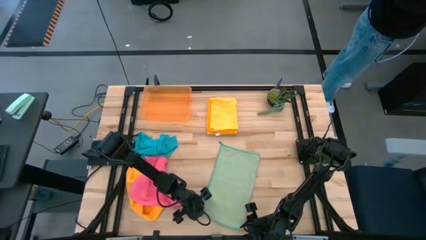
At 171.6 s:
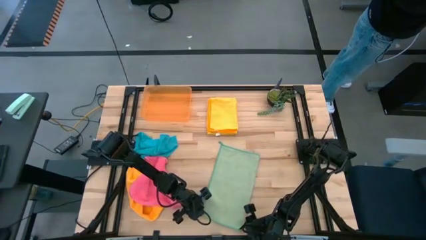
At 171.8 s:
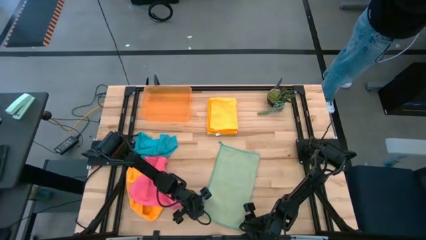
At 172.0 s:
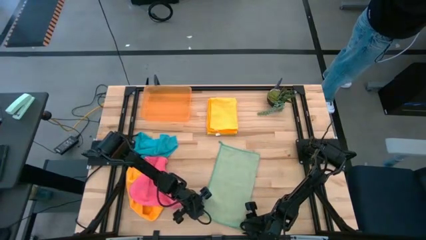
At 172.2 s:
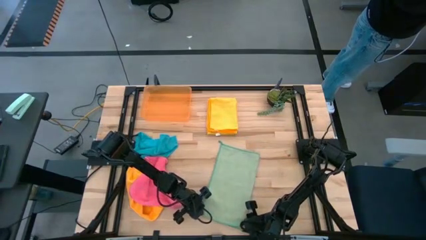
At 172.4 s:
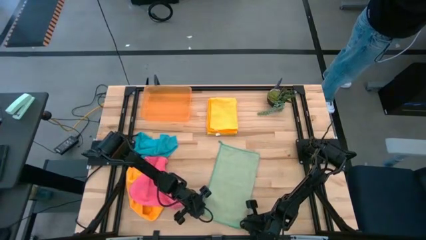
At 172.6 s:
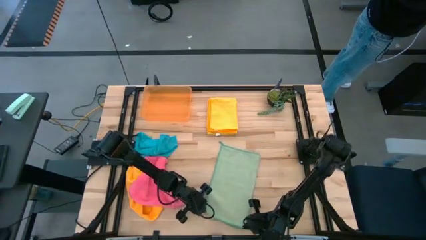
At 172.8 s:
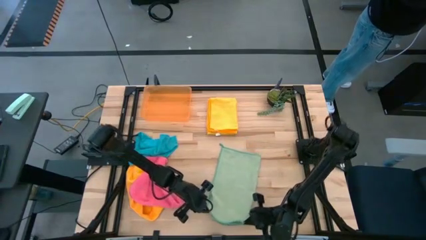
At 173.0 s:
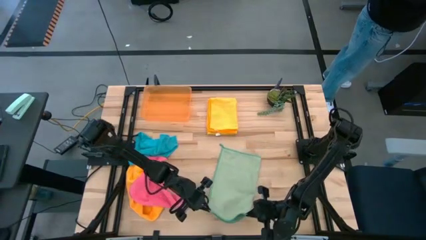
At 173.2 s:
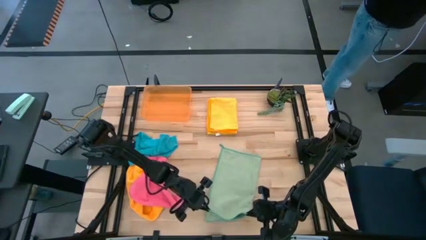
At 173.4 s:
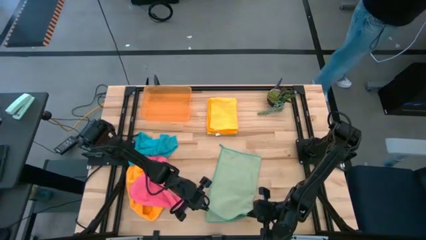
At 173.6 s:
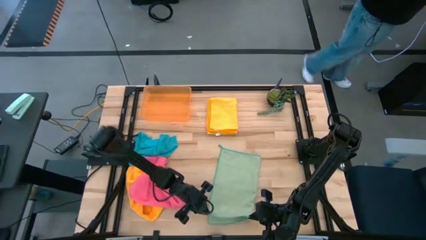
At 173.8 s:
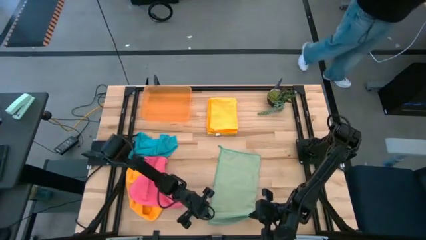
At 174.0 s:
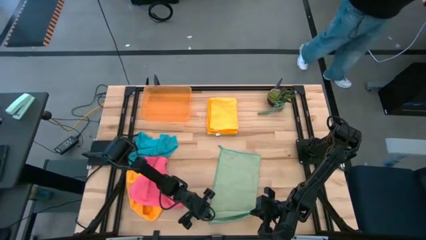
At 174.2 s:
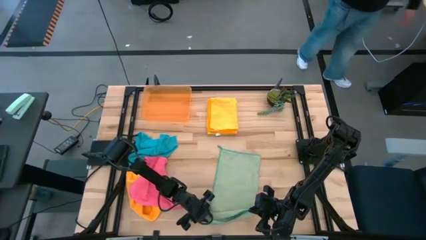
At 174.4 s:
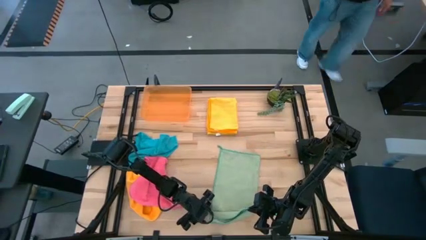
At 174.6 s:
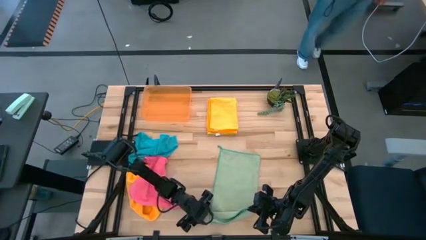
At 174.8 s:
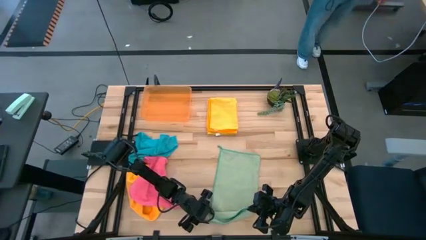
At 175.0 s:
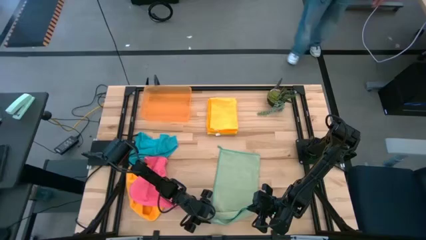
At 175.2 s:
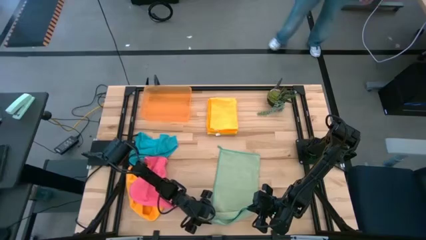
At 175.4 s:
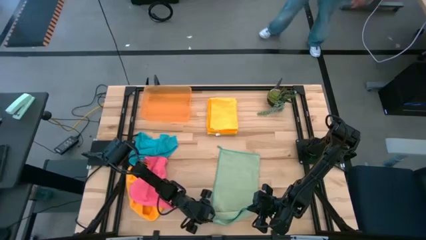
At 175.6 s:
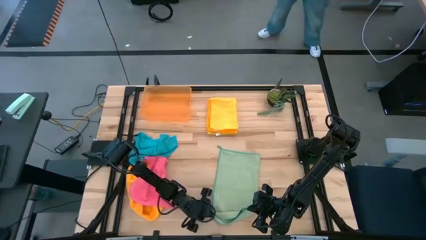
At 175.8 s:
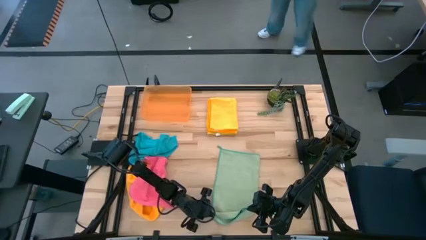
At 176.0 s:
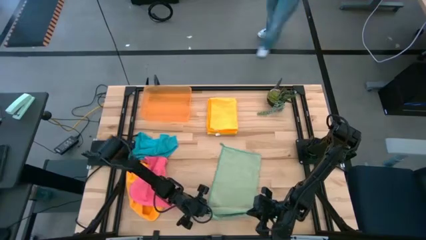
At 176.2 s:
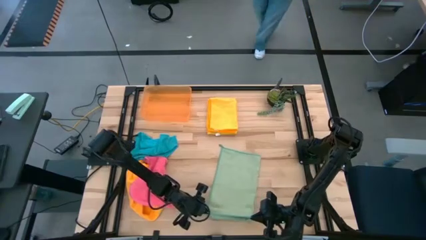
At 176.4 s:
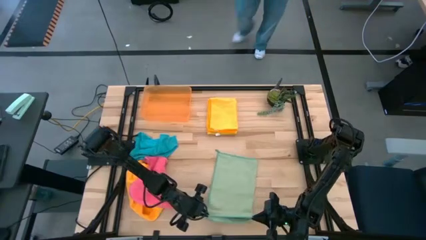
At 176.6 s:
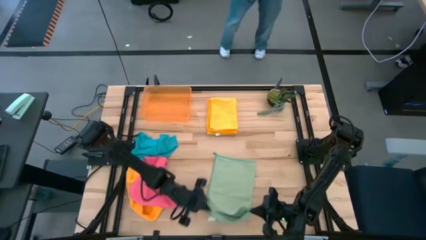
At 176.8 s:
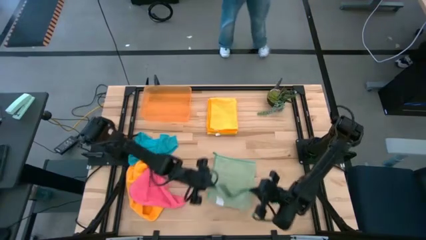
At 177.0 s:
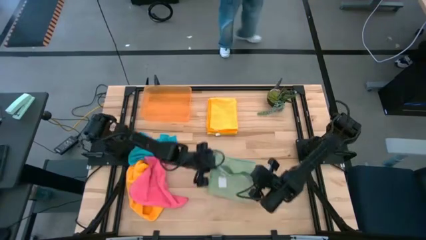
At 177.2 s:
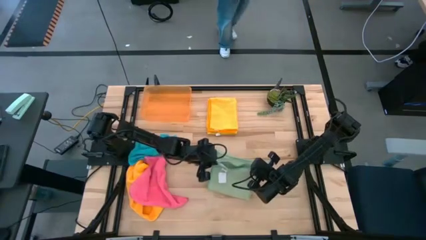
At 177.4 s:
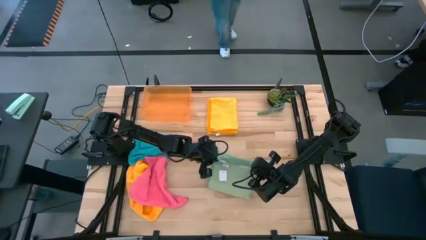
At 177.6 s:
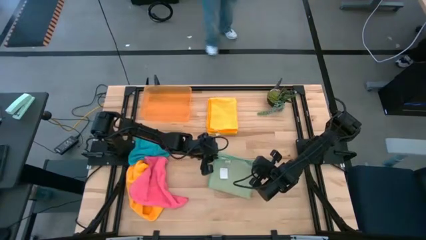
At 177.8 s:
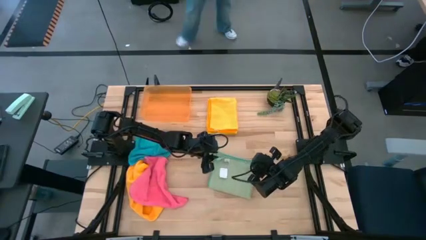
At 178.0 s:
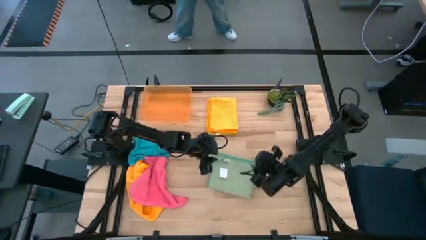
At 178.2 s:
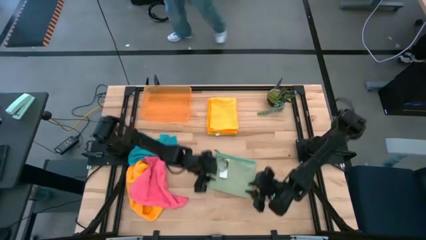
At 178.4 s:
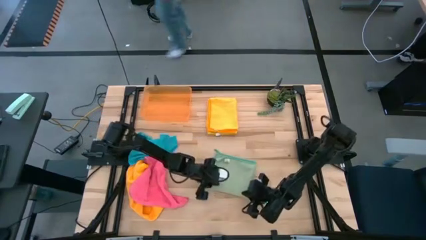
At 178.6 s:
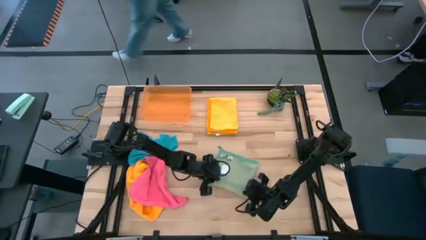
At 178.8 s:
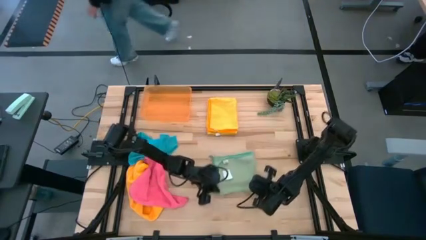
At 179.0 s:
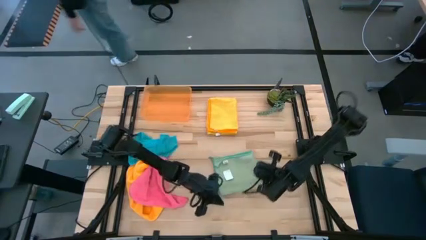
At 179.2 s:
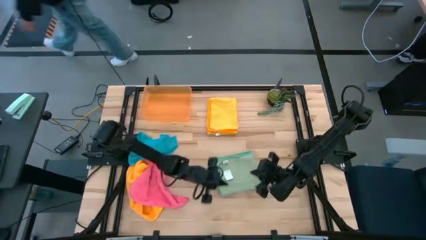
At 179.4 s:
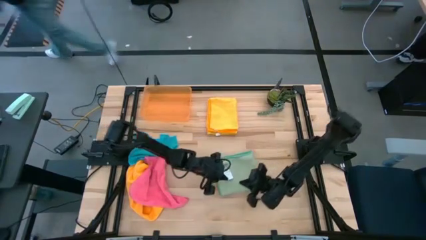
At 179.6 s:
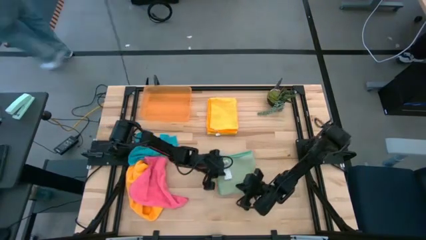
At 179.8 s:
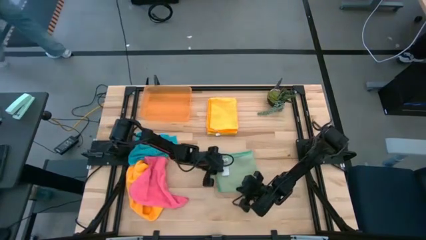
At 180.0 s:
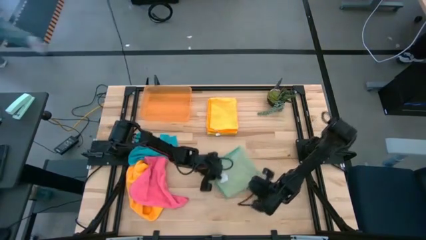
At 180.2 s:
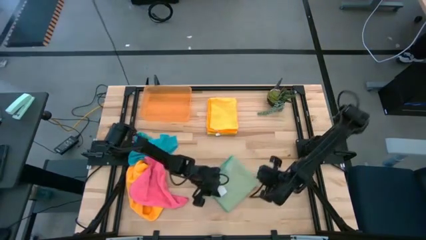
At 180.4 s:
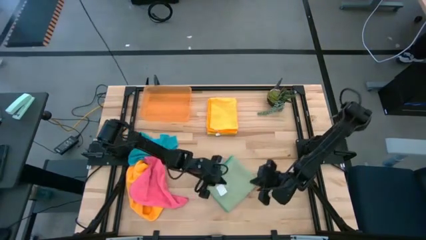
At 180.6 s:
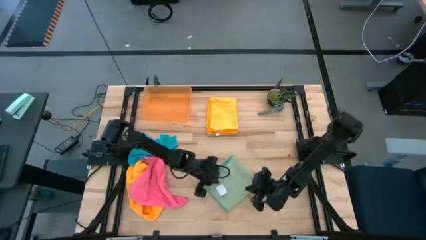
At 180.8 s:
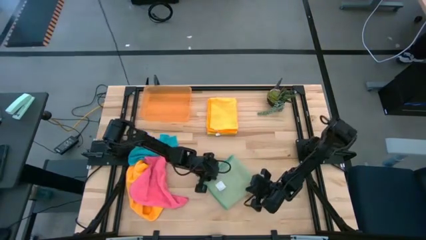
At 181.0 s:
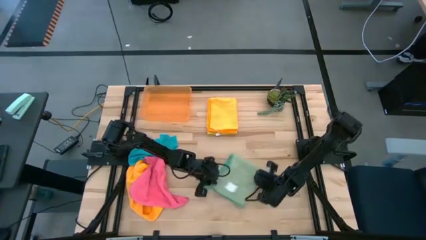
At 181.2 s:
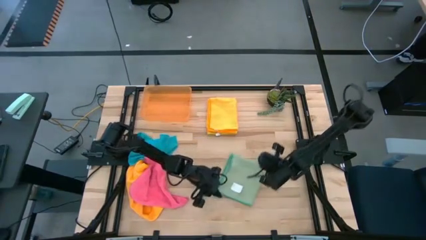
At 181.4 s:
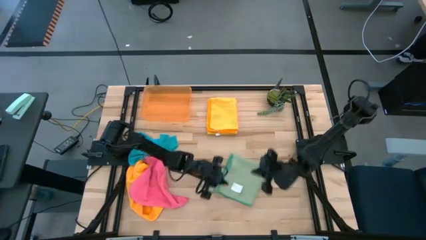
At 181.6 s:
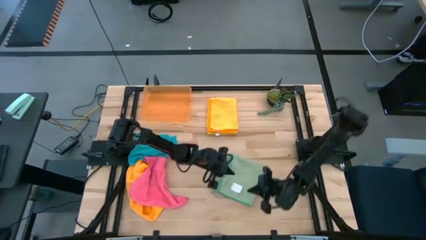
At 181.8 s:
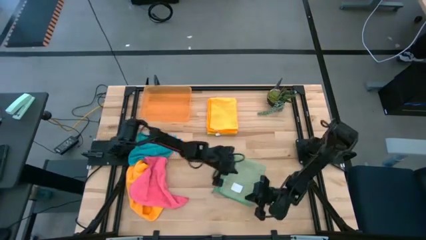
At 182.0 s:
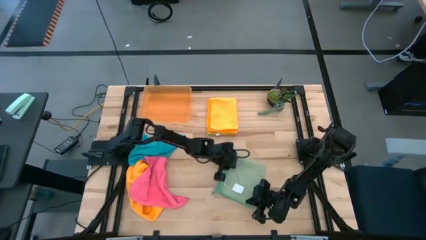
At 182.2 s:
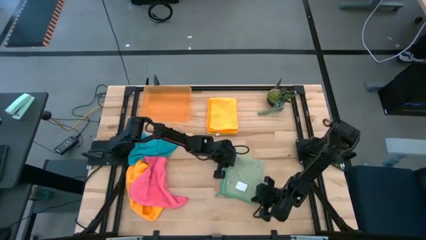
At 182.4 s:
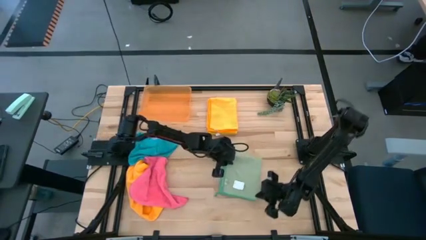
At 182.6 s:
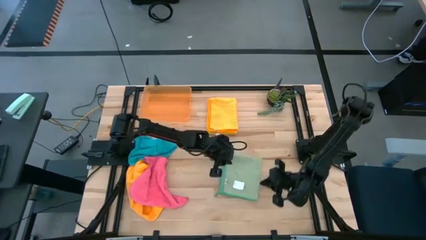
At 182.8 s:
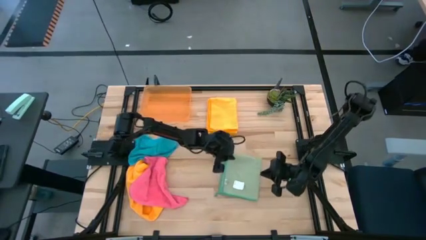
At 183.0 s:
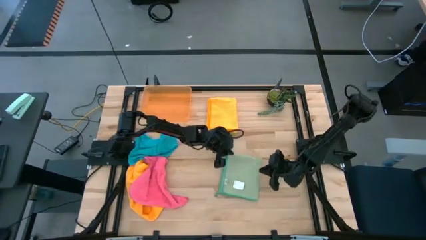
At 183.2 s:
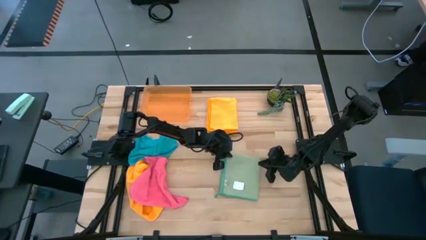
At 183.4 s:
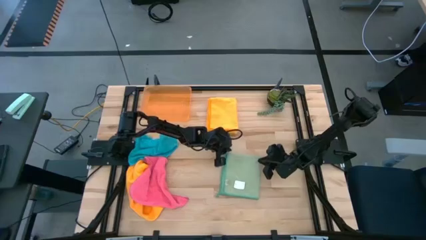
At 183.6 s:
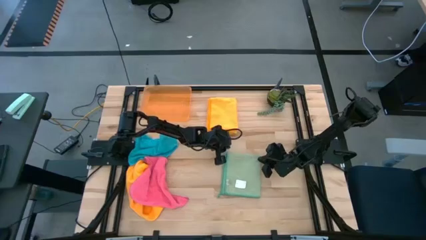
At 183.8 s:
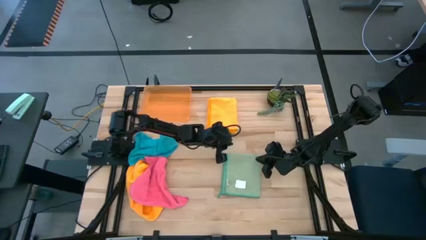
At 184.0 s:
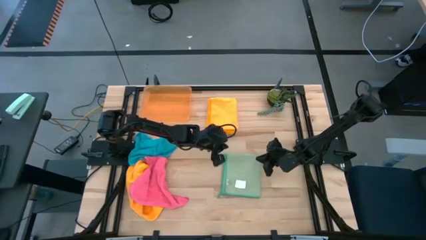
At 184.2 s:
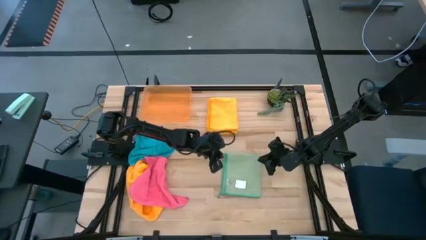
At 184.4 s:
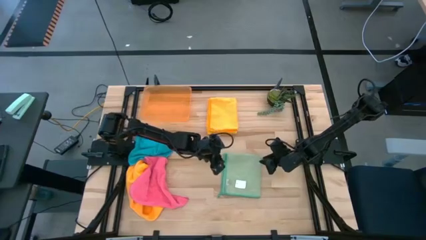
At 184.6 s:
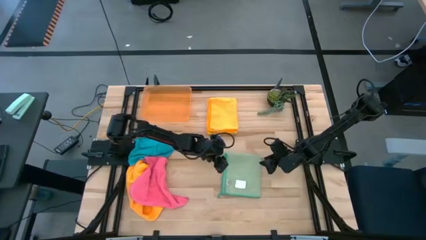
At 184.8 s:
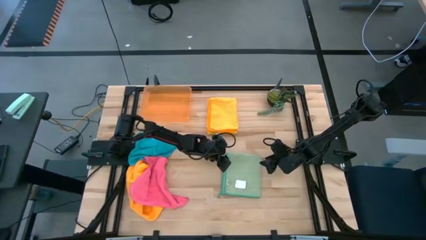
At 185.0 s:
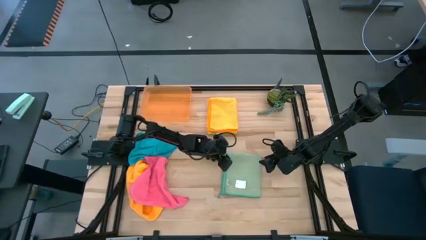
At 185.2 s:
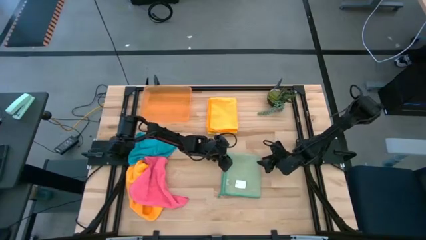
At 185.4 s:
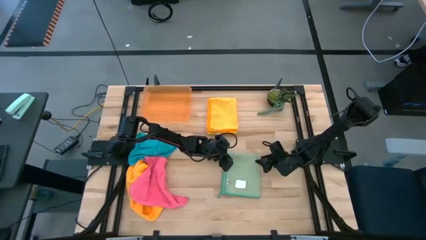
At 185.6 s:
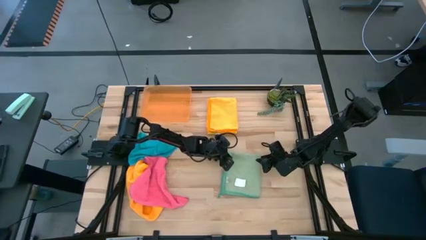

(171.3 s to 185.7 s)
Task: Fold microfiber towels
Fold the light green towel

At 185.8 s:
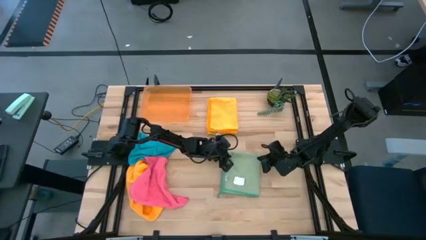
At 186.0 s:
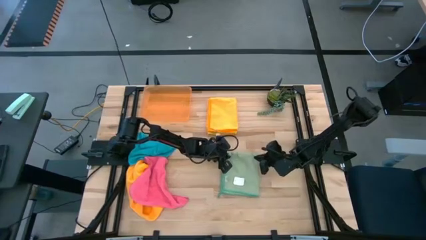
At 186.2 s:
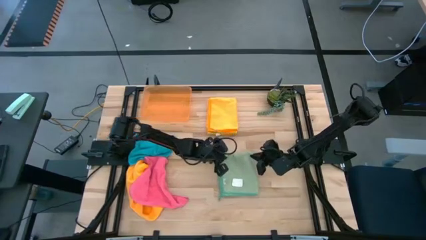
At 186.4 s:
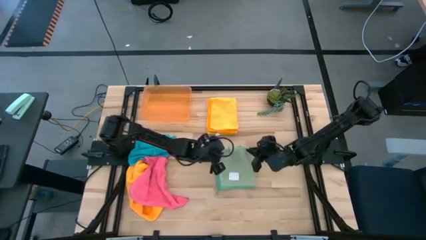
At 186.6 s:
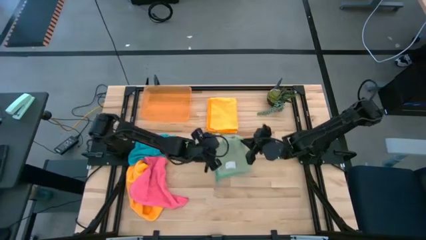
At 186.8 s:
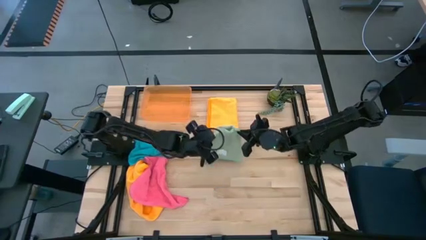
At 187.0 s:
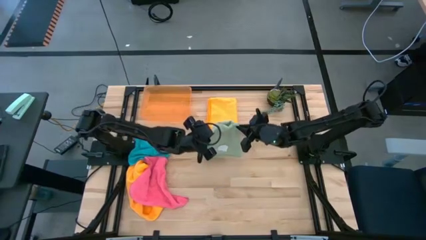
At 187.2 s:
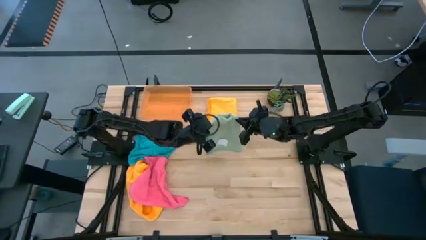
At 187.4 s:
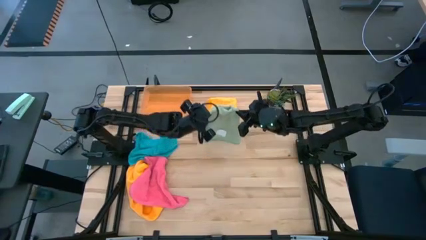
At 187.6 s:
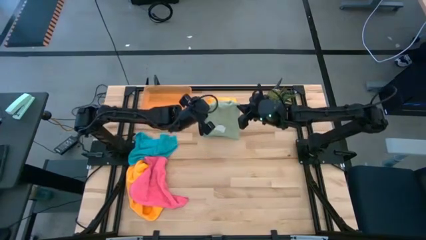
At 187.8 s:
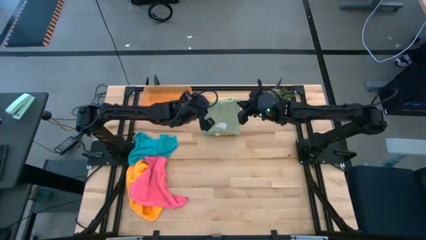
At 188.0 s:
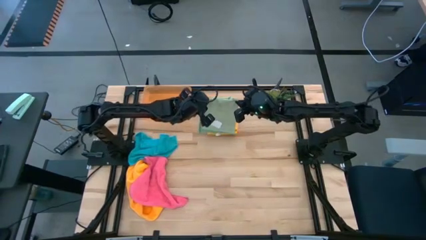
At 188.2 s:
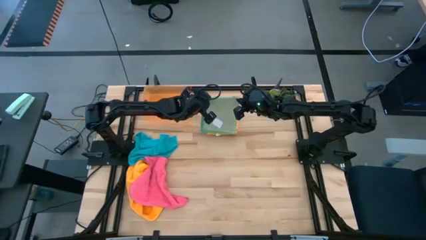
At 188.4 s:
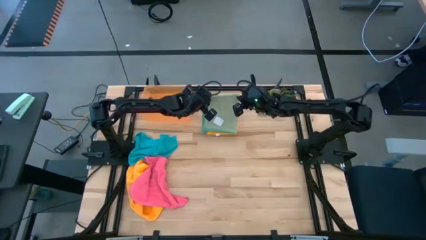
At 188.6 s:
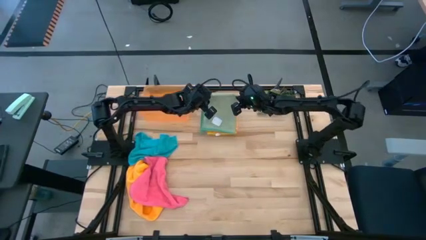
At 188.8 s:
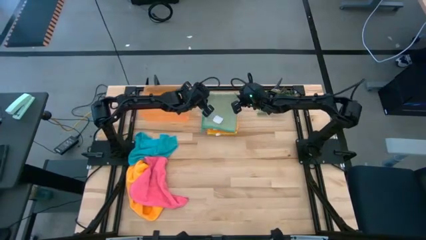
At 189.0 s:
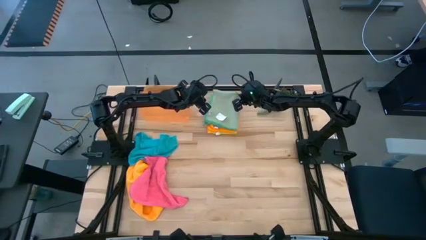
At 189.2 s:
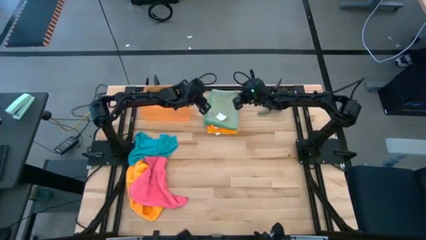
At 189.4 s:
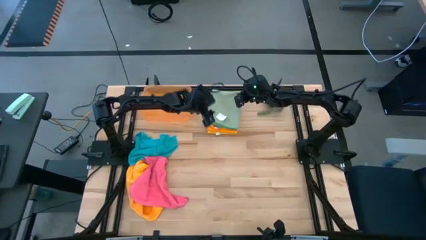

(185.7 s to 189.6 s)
Stack the folded light green towel on the folded orange towel
